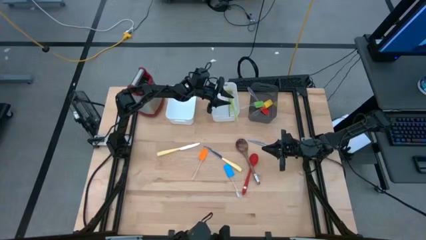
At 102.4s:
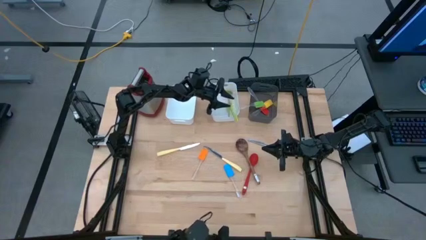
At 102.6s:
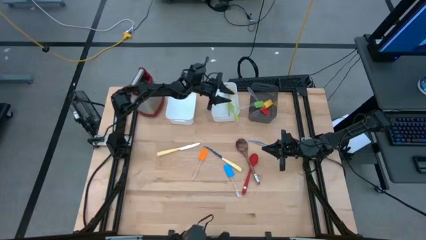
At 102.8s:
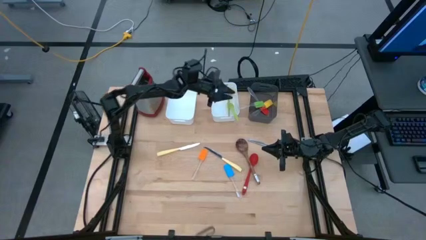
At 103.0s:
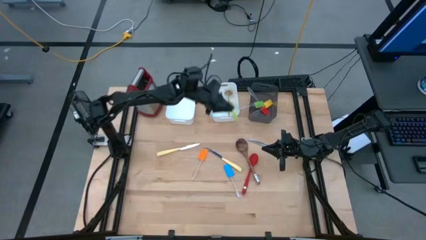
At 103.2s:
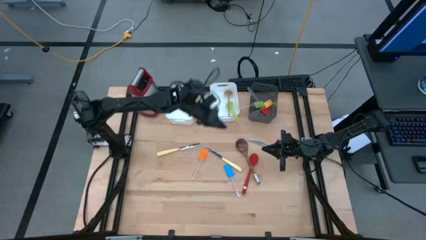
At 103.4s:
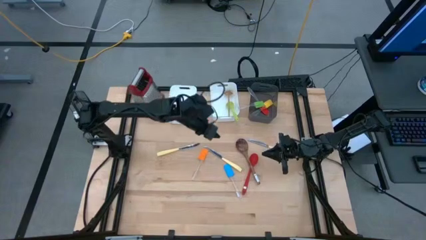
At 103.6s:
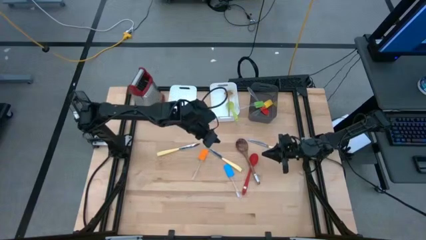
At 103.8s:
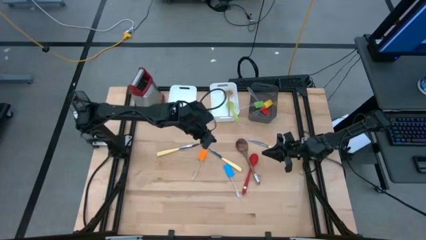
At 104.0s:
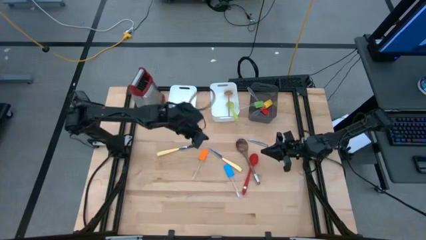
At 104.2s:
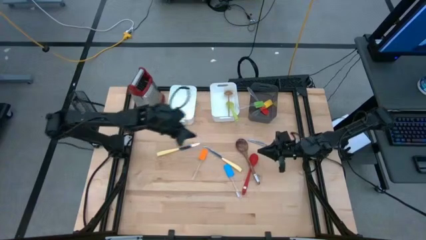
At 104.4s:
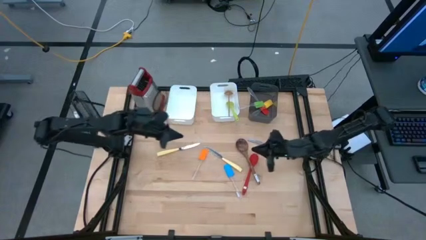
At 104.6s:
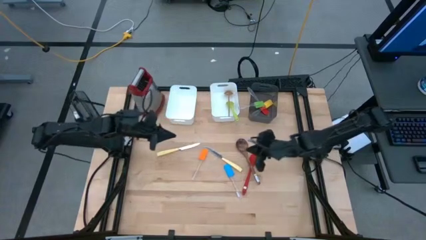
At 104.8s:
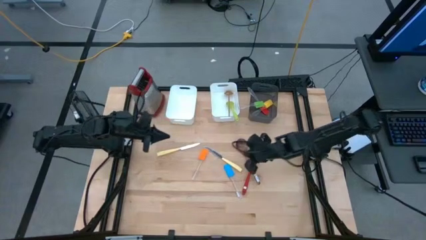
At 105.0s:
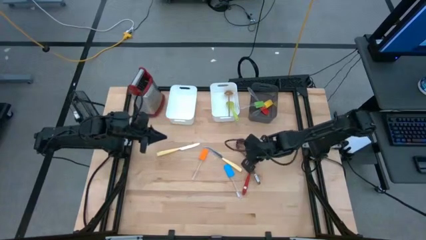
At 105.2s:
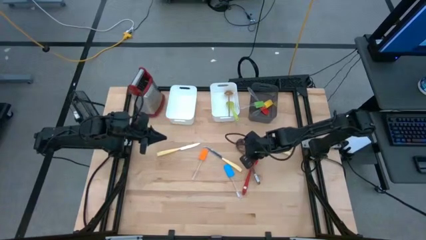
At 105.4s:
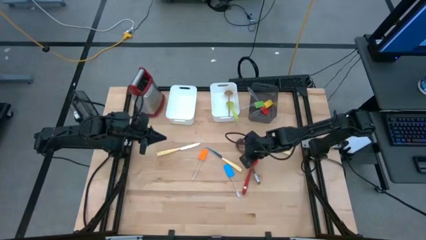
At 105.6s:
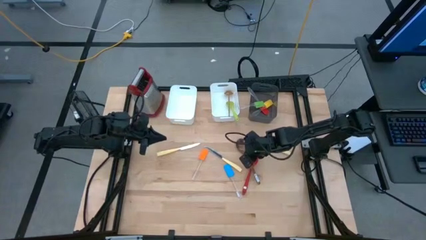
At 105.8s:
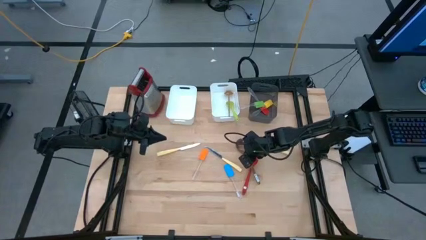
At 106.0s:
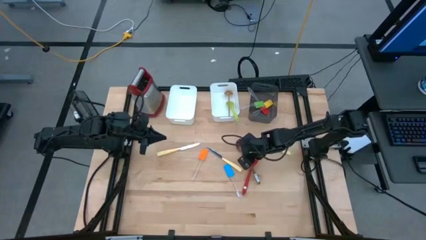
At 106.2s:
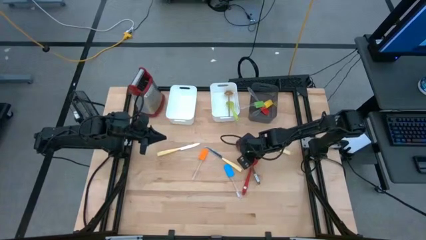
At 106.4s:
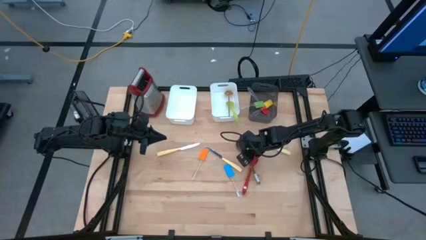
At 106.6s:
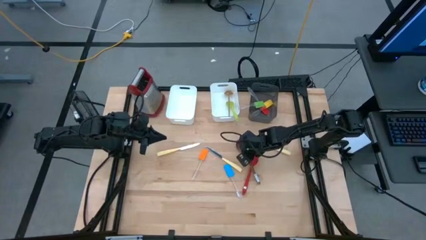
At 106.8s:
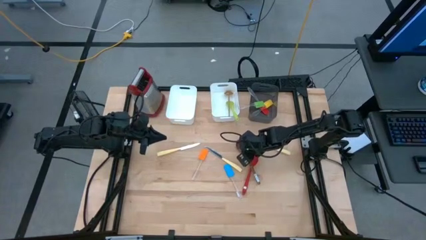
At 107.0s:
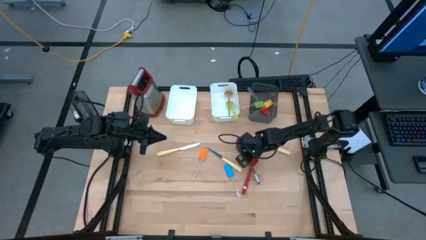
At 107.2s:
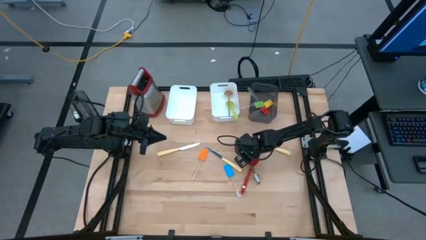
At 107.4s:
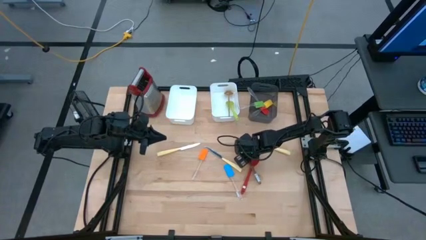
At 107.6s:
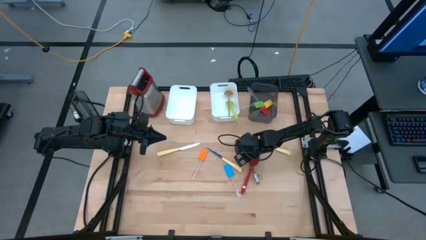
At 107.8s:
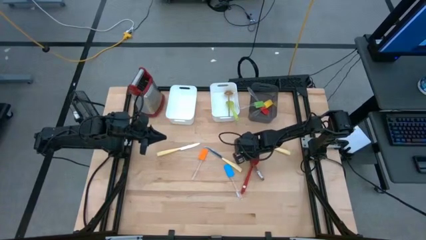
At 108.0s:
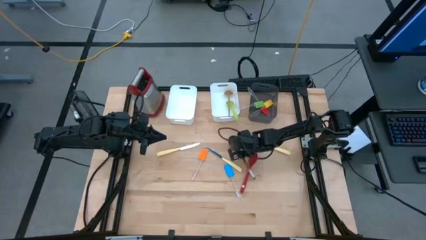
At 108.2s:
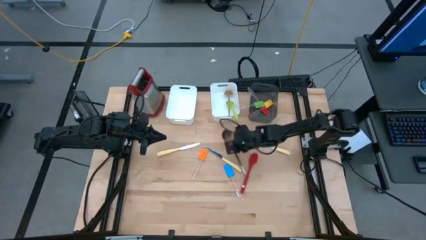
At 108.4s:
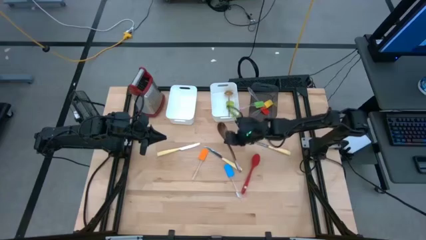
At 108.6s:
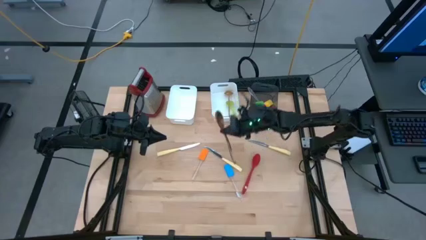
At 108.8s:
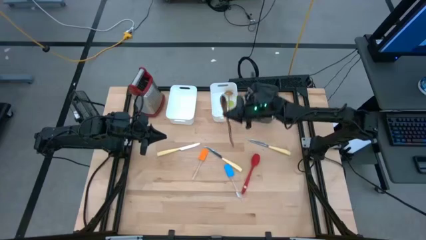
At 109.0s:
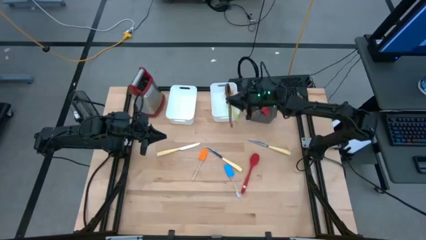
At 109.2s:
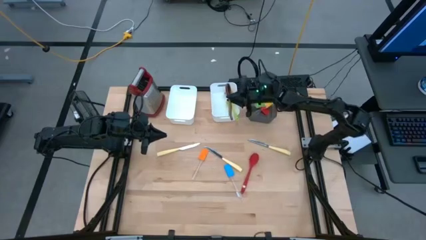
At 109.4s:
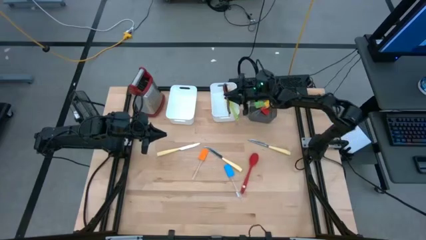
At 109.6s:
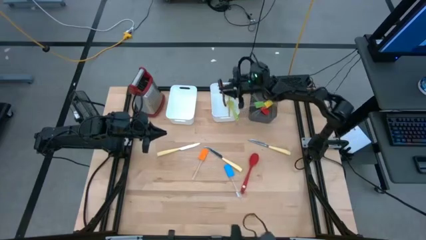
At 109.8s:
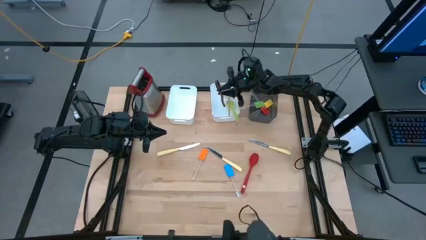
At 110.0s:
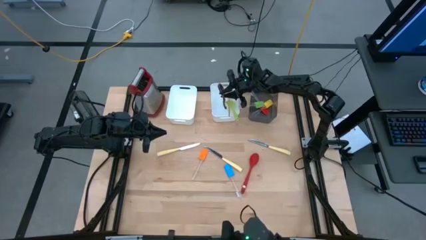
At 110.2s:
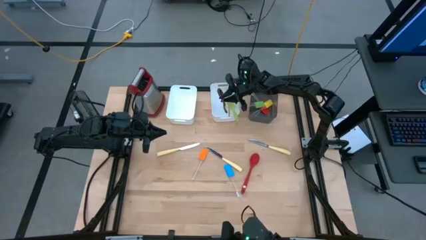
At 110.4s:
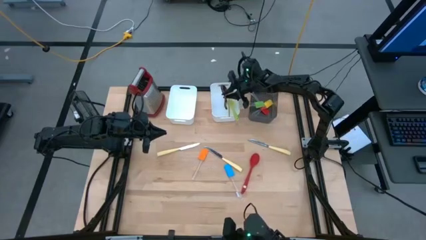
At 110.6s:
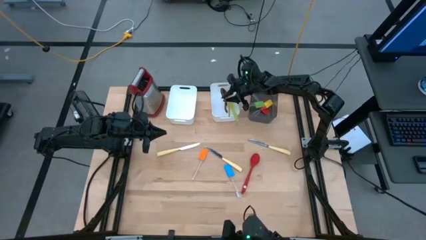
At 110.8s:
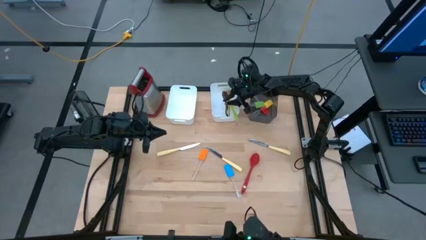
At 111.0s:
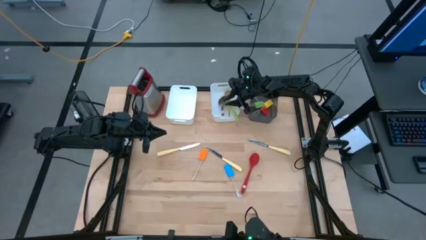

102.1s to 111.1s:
Task: Pick & Place Kitchen Items
Put the brown serving spoon into the right white bin

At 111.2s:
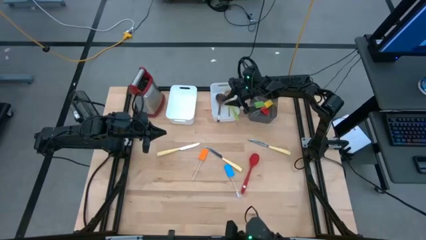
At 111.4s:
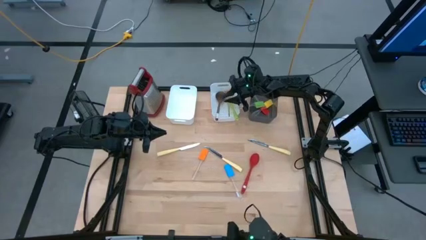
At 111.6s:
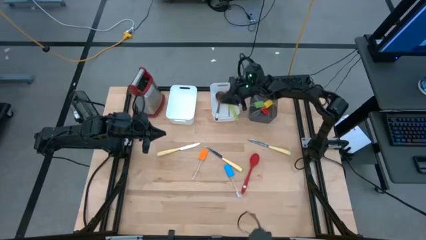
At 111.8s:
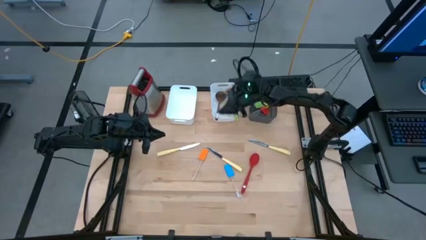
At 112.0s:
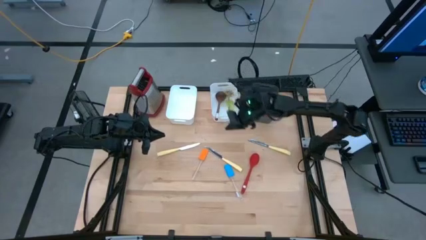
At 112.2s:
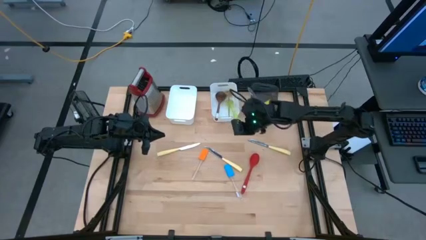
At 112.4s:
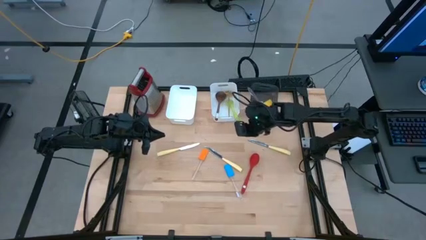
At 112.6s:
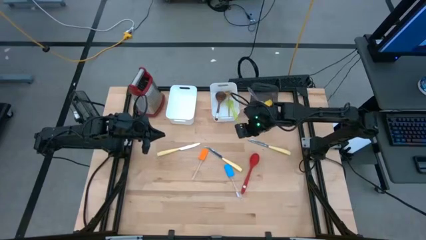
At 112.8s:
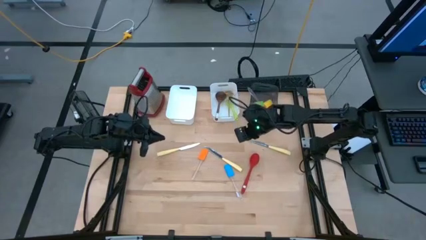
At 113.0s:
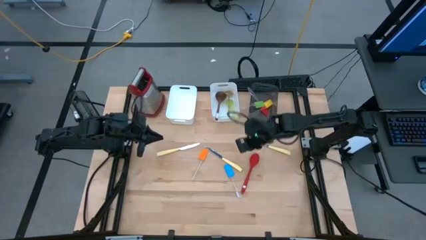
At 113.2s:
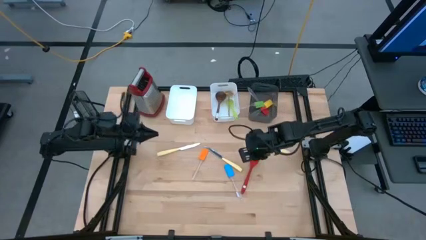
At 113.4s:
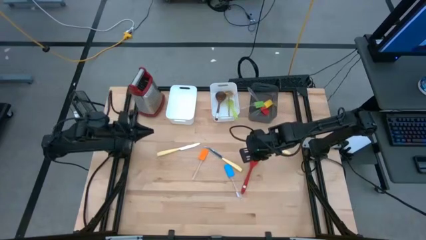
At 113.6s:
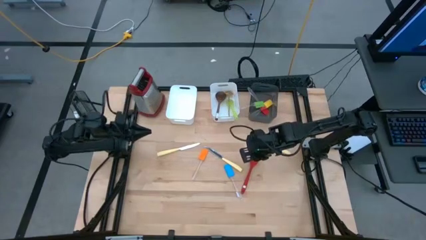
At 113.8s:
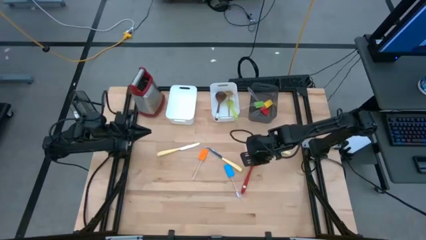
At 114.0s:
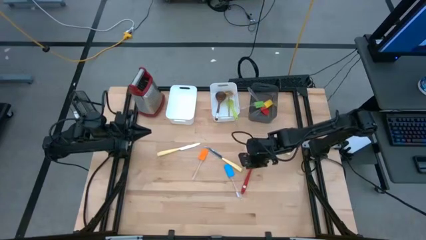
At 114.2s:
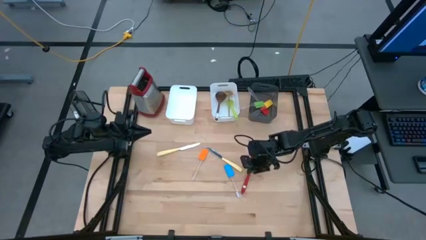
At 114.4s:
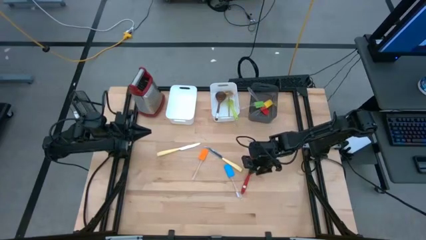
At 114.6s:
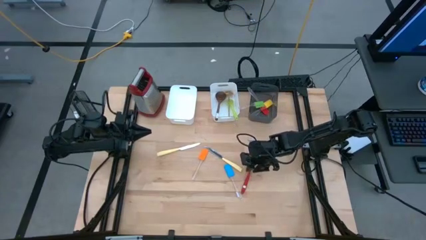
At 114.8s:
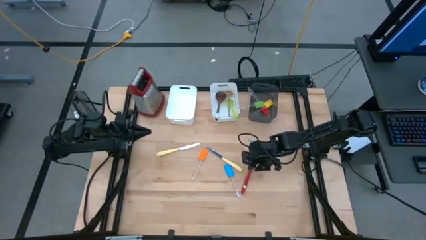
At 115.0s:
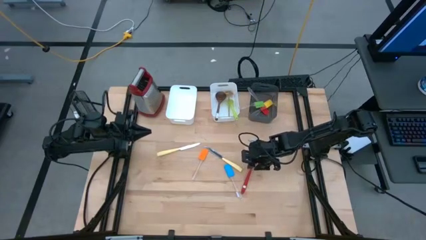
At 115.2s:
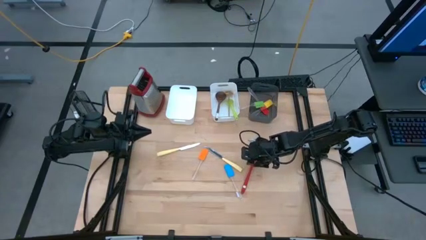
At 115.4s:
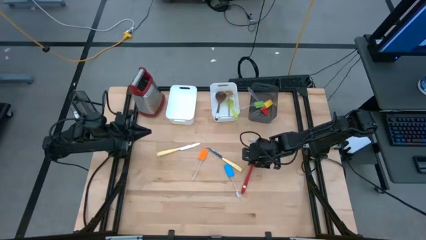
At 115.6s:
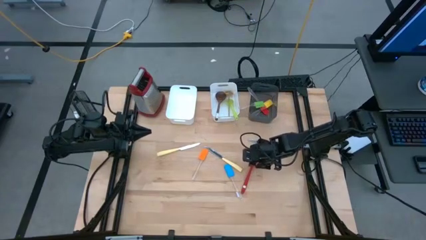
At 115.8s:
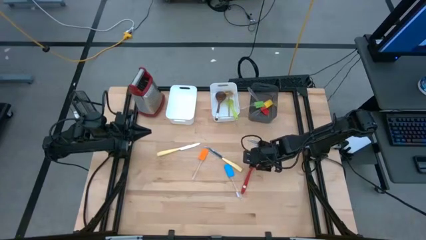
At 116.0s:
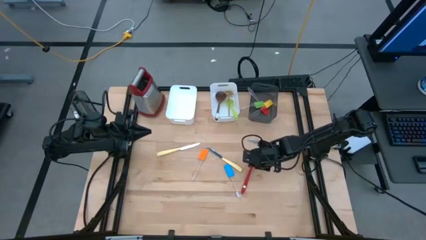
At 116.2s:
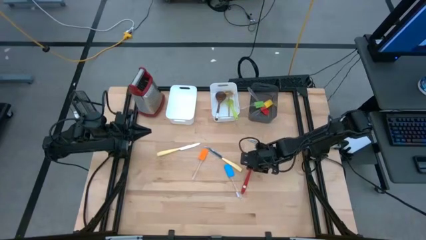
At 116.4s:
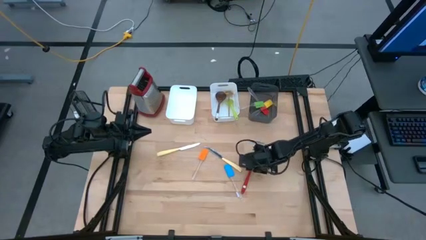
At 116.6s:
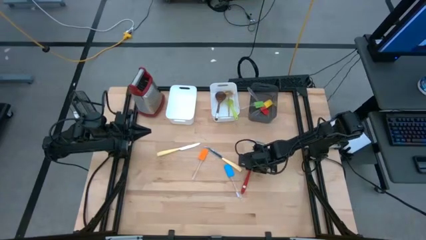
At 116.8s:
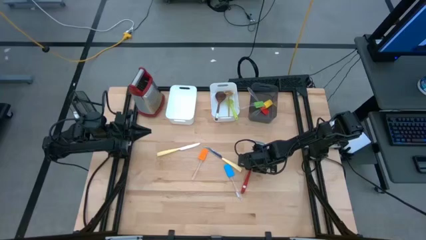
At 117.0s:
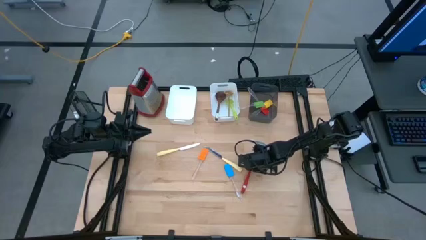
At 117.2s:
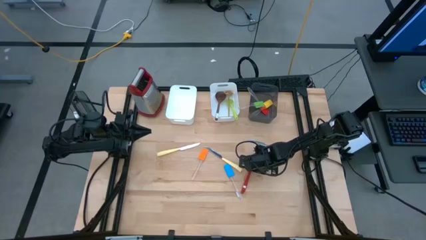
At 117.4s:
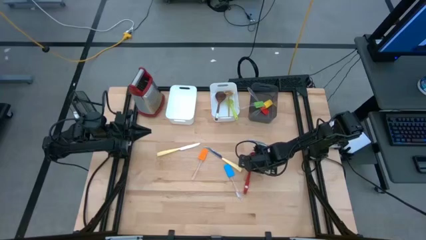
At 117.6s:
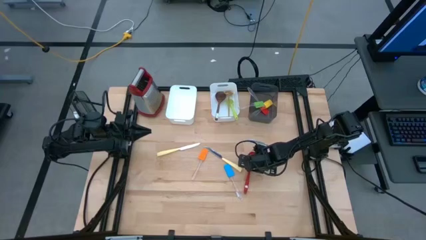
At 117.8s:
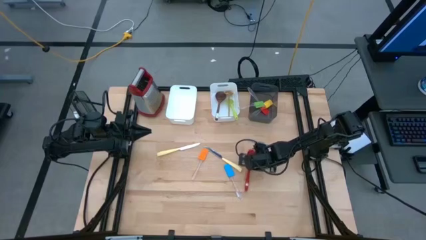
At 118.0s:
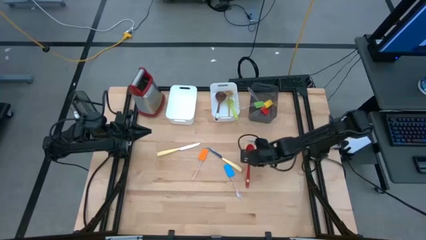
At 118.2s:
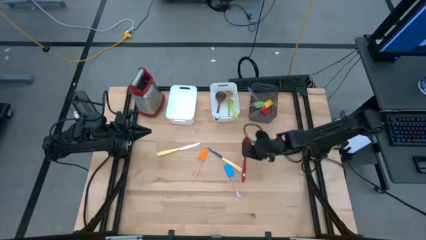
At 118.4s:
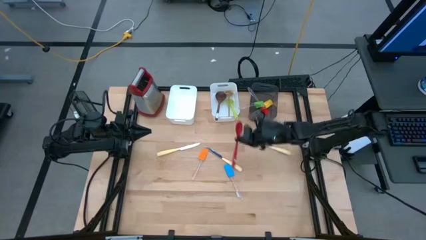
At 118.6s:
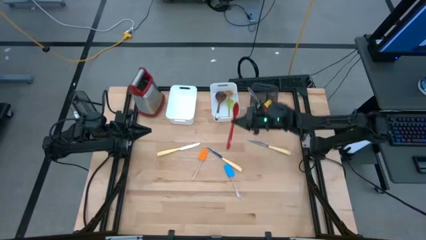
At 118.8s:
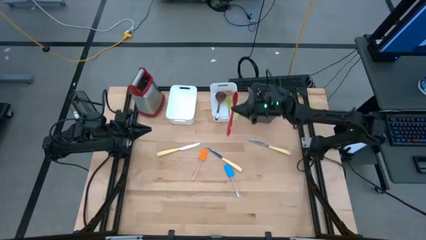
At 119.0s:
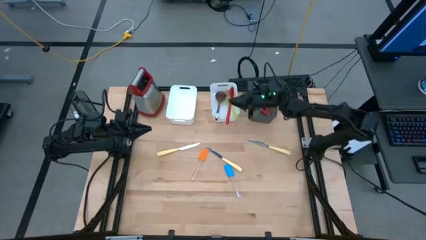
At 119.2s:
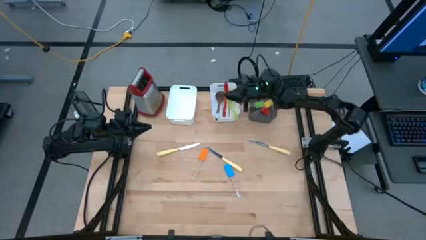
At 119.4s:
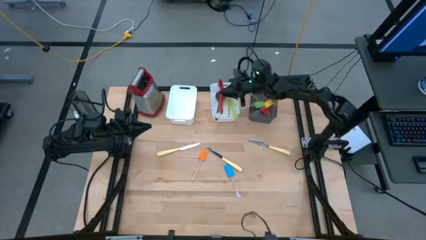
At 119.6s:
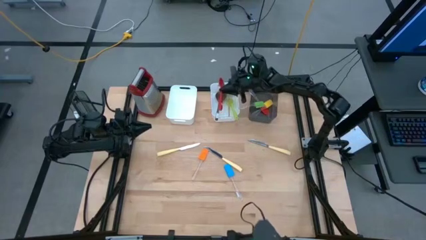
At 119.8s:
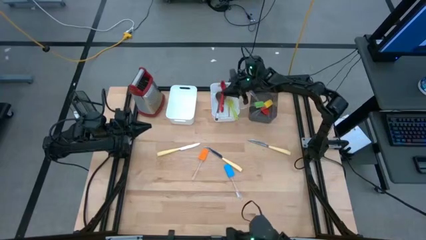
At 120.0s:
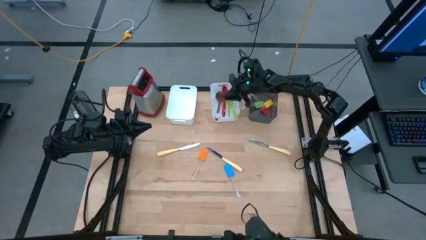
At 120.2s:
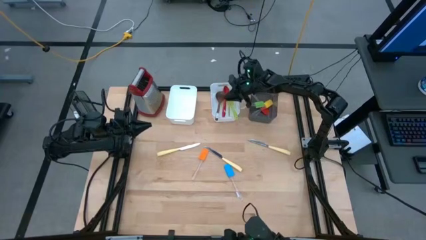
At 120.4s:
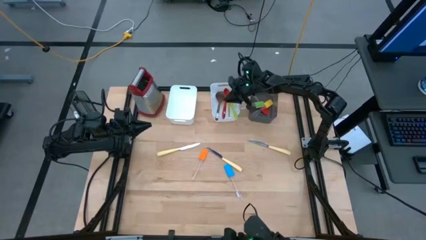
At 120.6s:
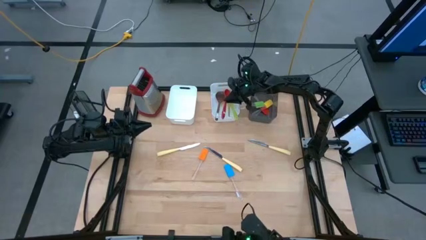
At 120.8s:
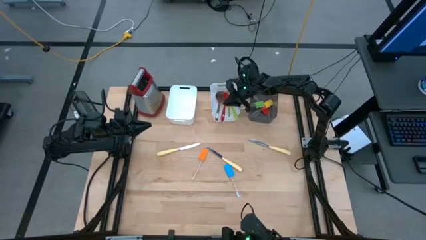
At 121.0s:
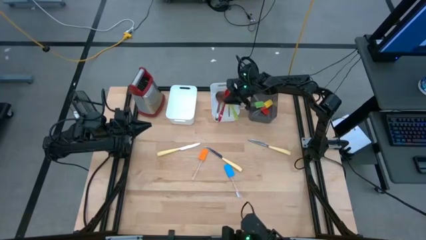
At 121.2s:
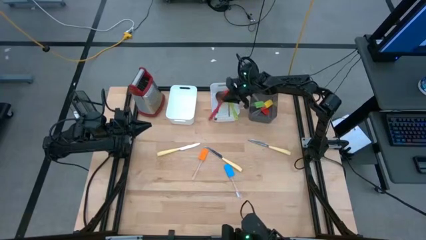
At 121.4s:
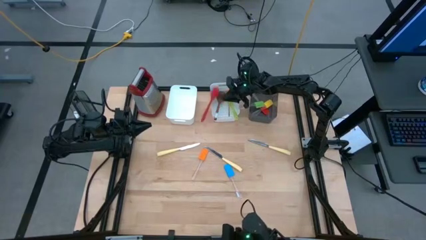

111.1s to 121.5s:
Put the red serving spoon into the right white bin
